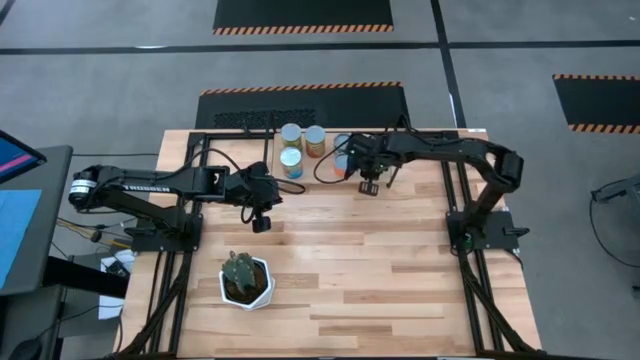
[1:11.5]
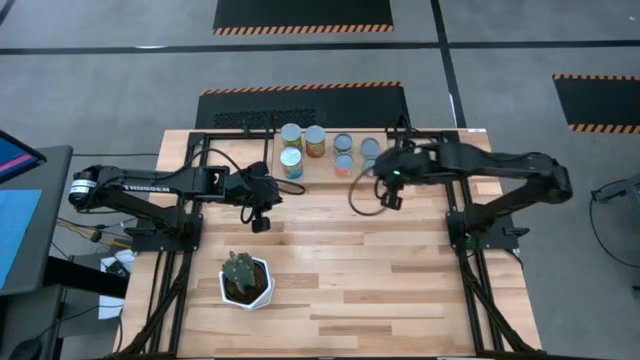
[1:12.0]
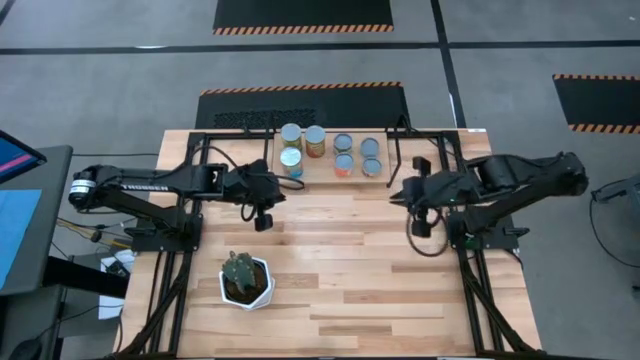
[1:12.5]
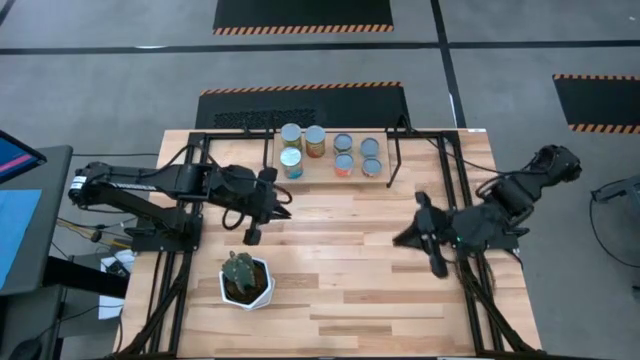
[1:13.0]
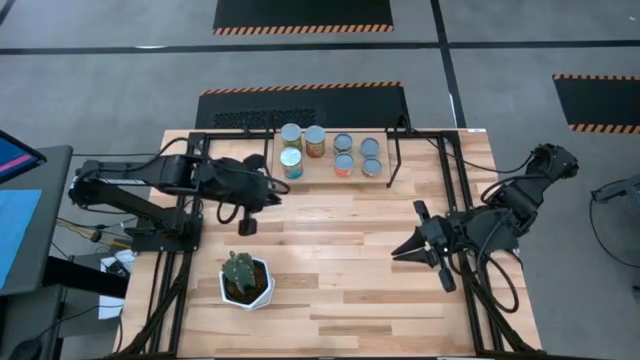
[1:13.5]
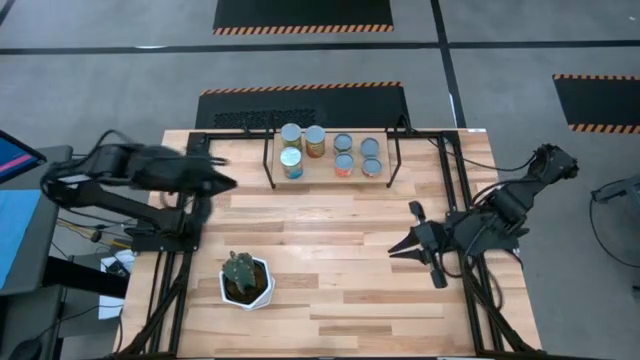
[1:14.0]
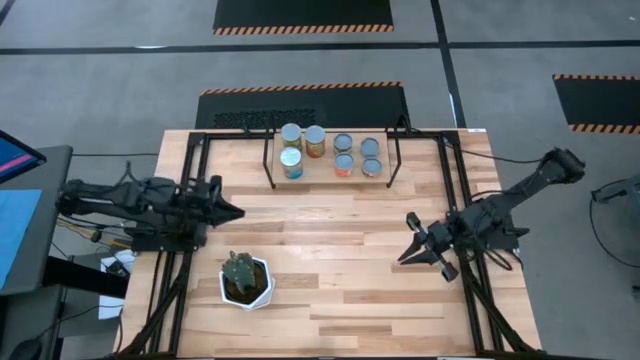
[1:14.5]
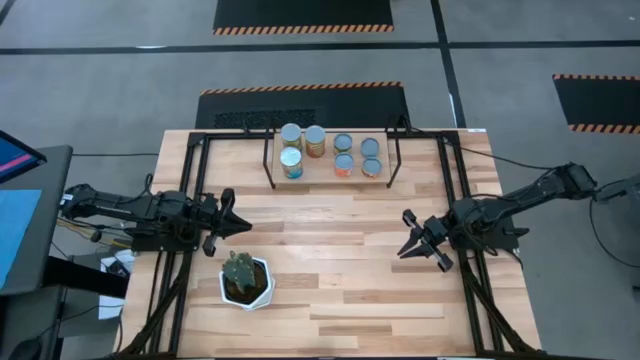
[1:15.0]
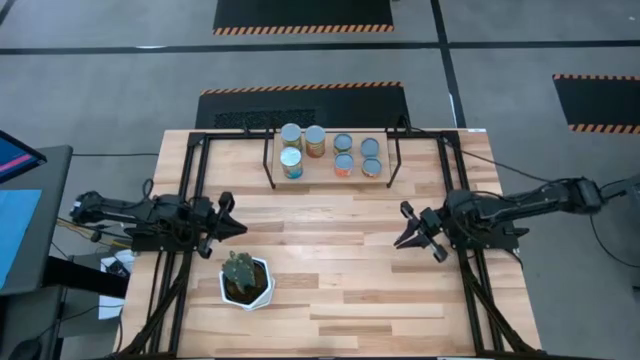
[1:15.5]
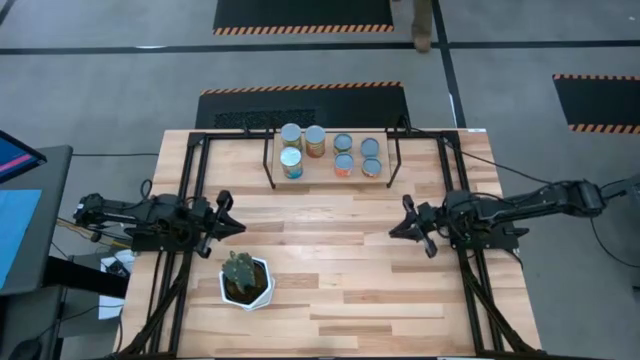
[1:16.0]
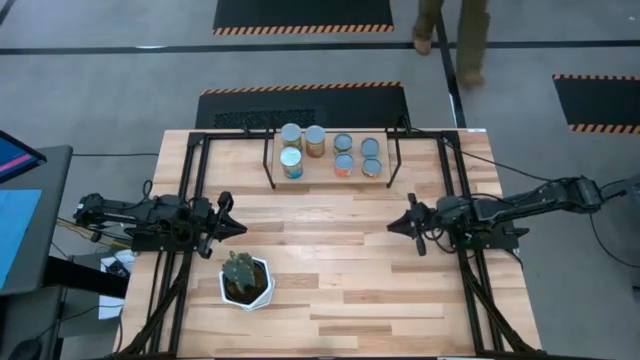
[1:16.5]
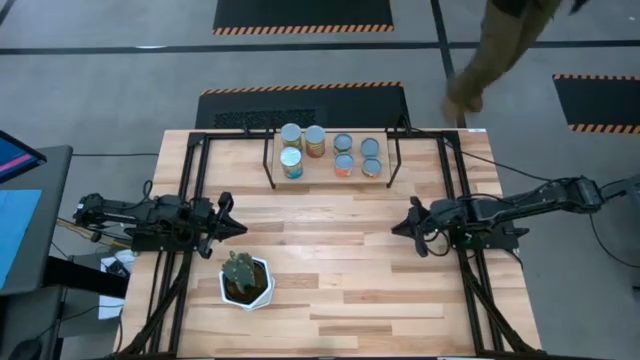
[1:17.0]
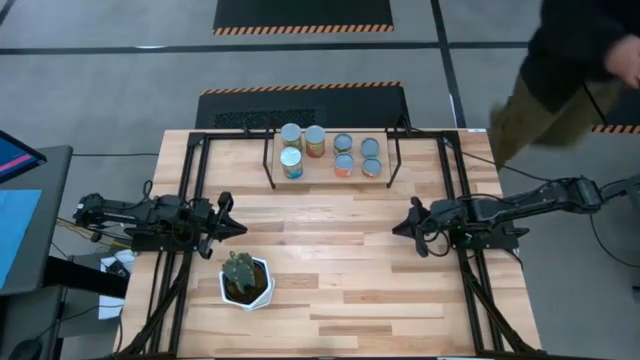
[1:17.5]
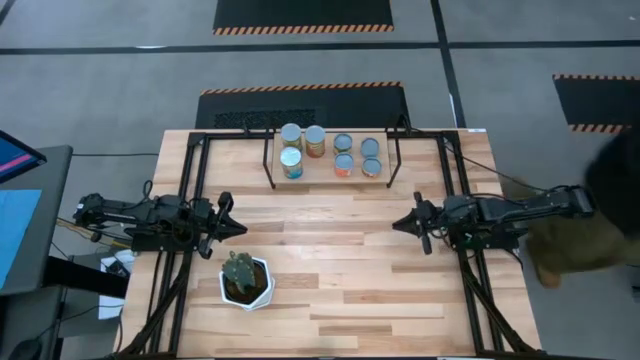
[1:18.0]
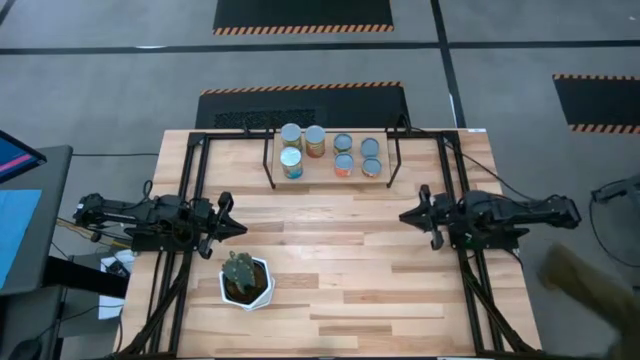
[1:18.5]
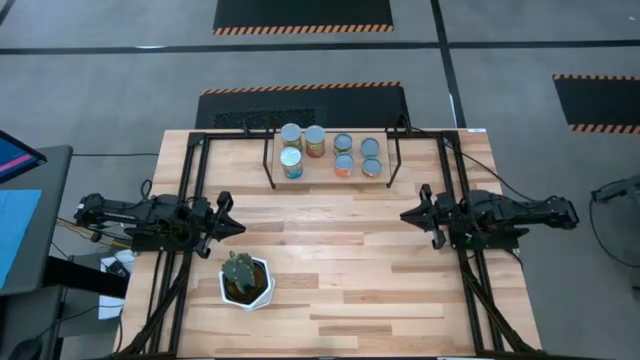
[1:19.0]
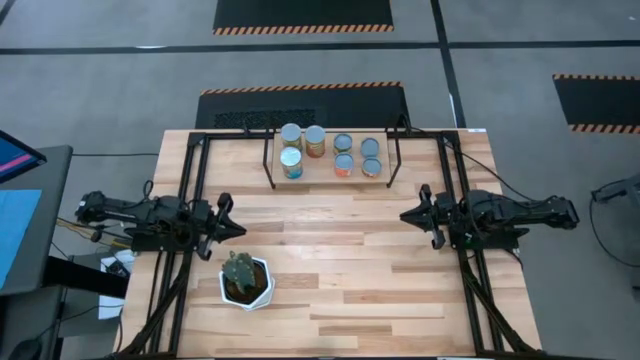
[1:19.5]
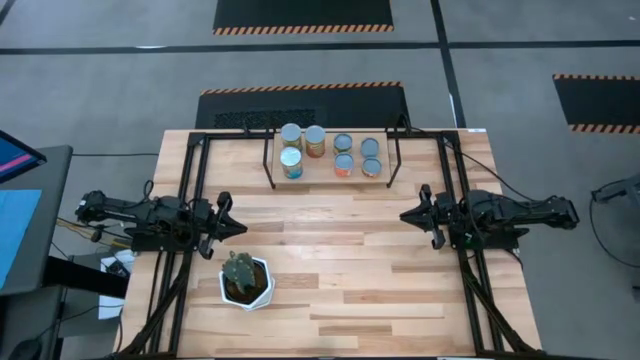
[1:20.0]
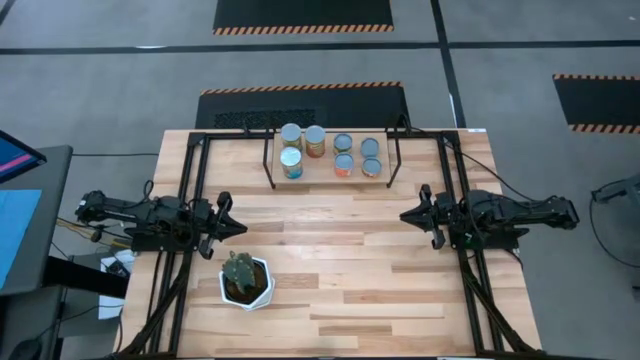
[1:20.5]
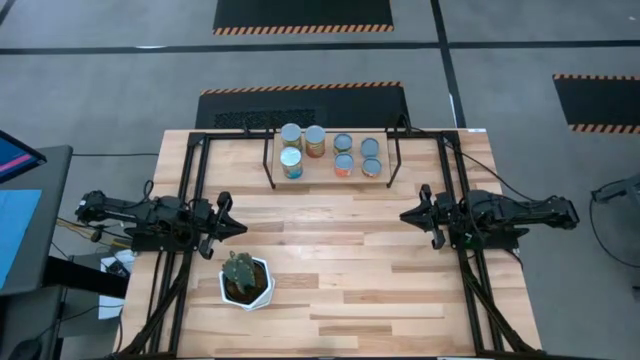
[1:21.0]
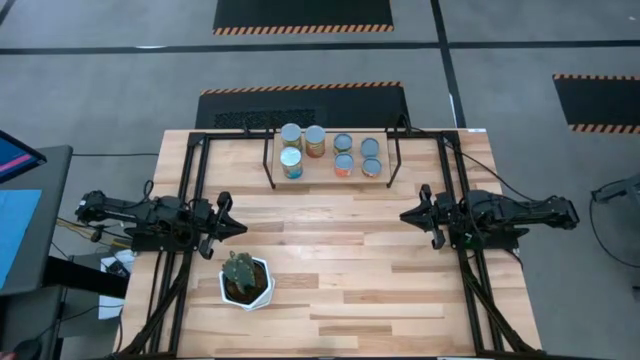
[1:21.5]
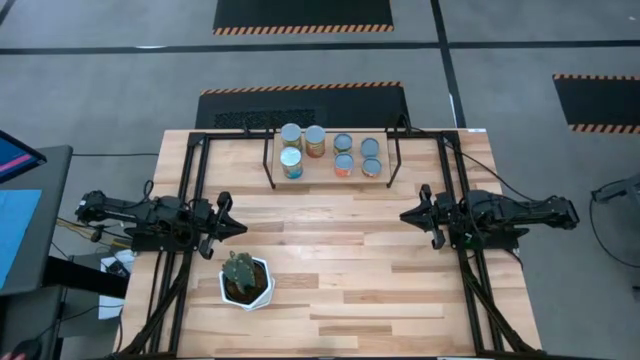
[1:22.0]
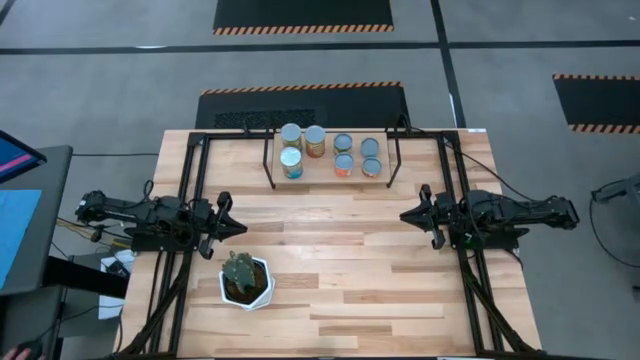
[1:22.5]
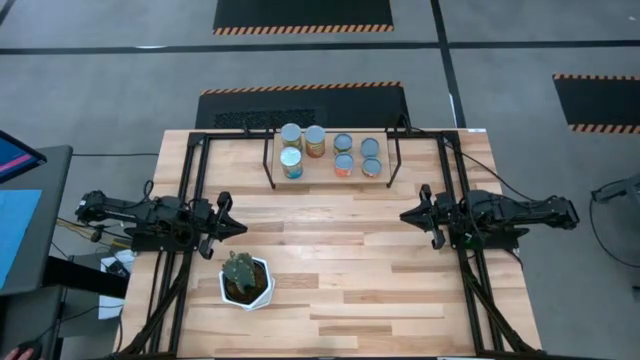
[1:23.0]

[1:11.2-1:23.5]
Task: Pick and place cans onto a shelf
Return to Home Position

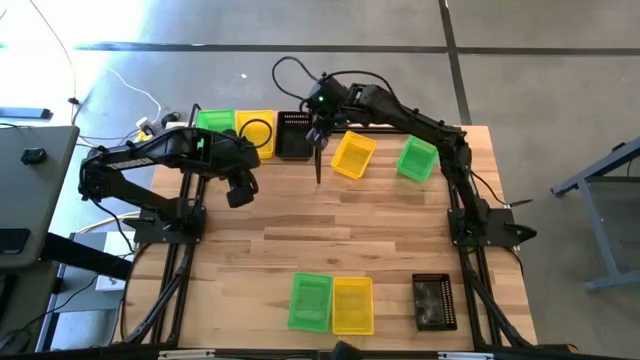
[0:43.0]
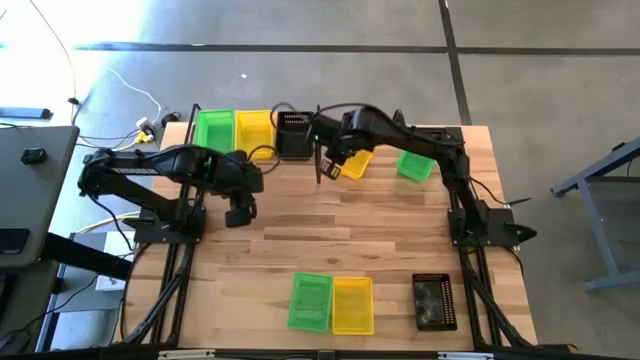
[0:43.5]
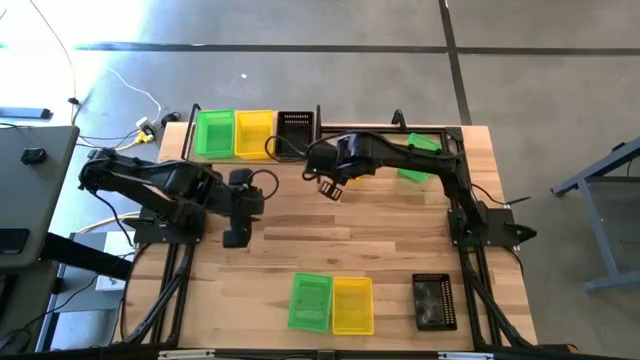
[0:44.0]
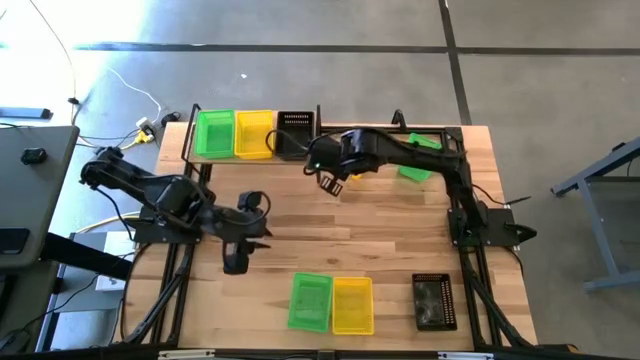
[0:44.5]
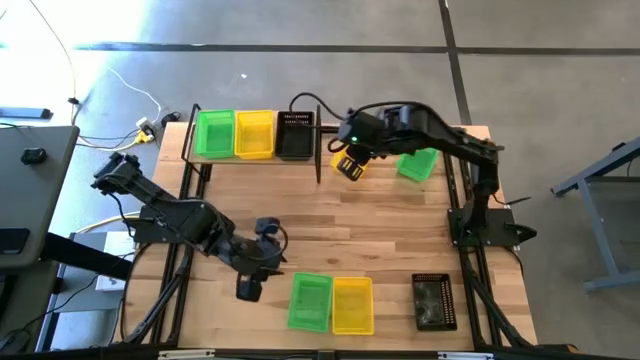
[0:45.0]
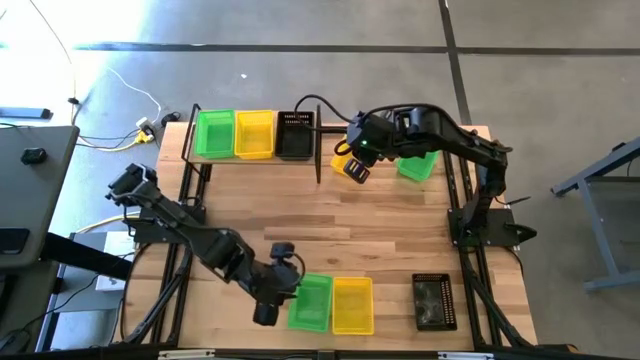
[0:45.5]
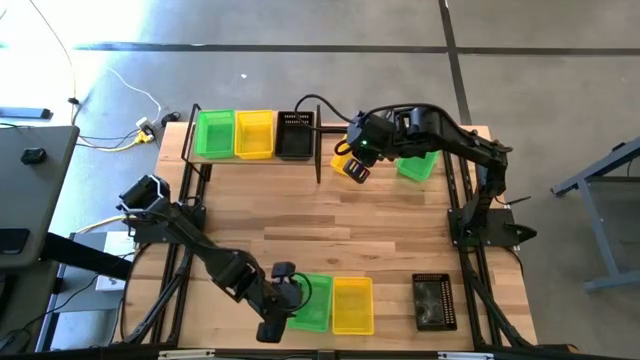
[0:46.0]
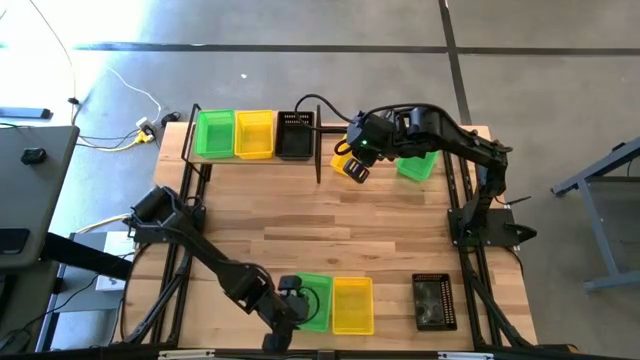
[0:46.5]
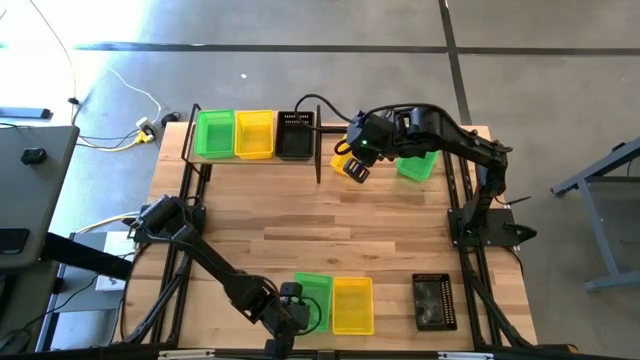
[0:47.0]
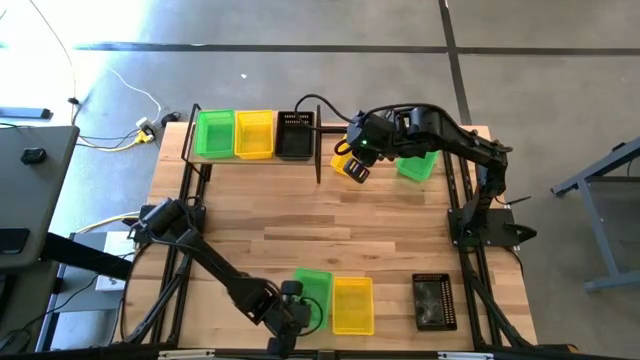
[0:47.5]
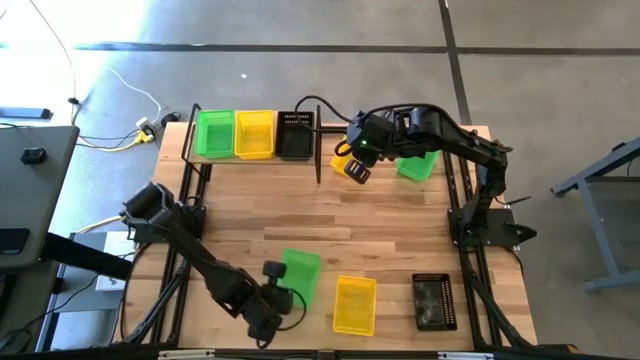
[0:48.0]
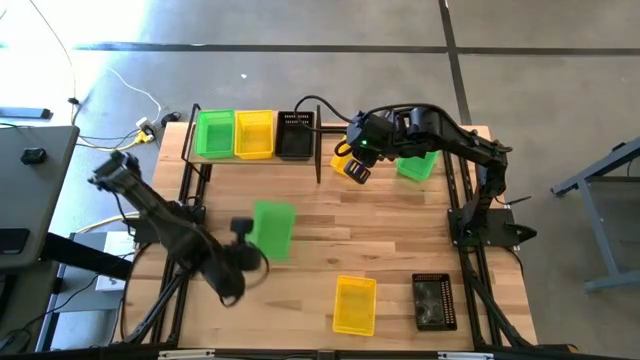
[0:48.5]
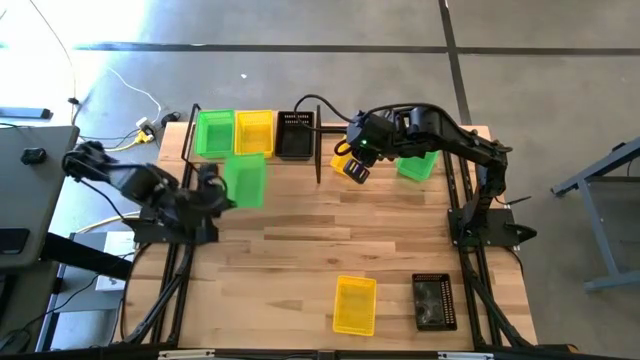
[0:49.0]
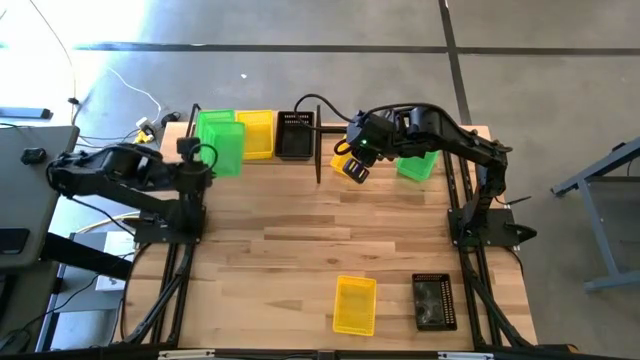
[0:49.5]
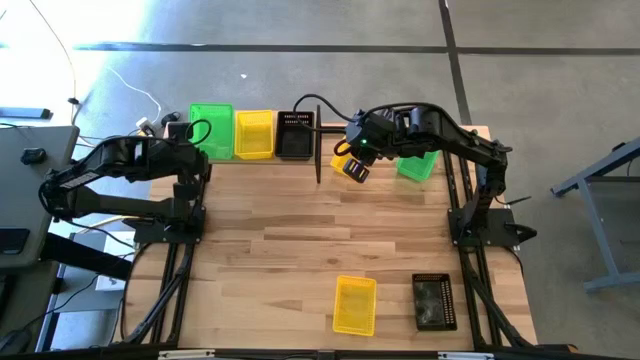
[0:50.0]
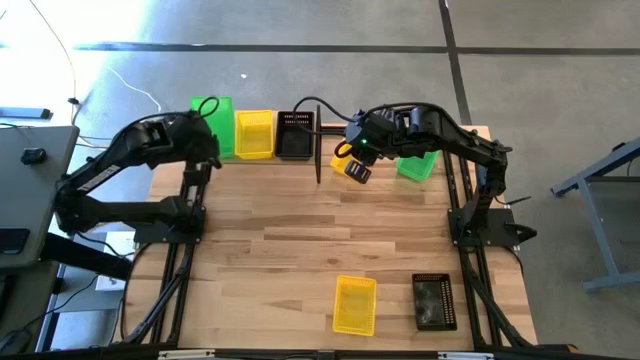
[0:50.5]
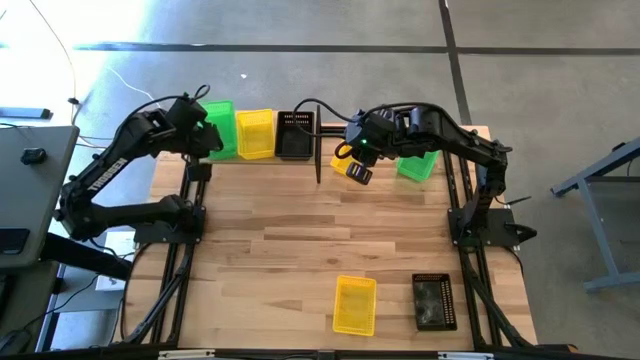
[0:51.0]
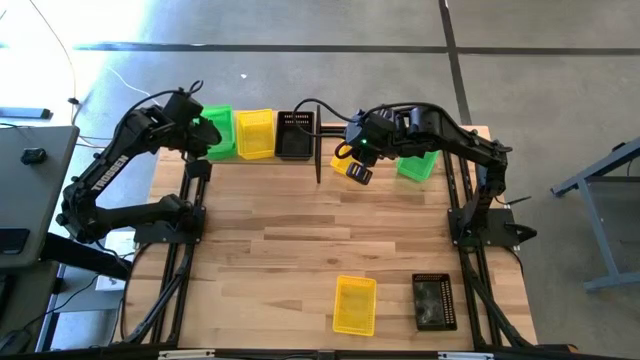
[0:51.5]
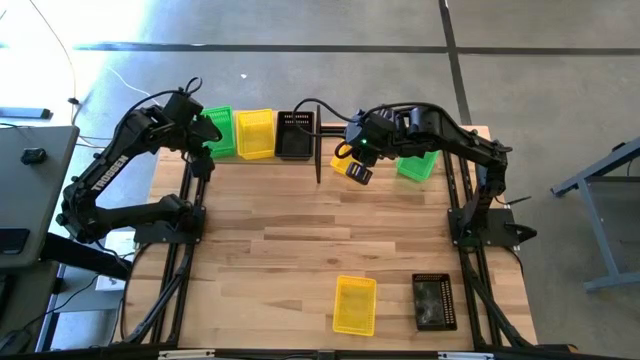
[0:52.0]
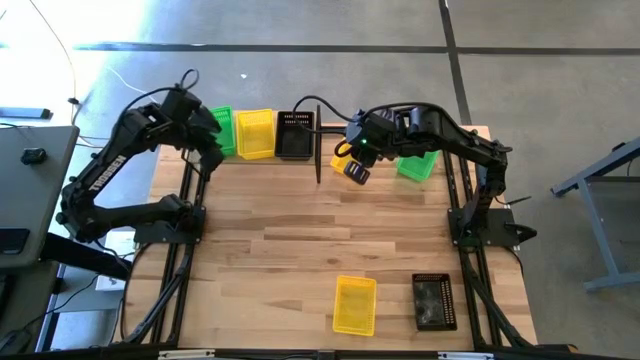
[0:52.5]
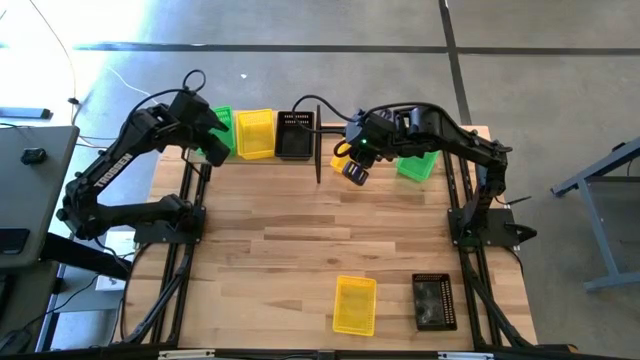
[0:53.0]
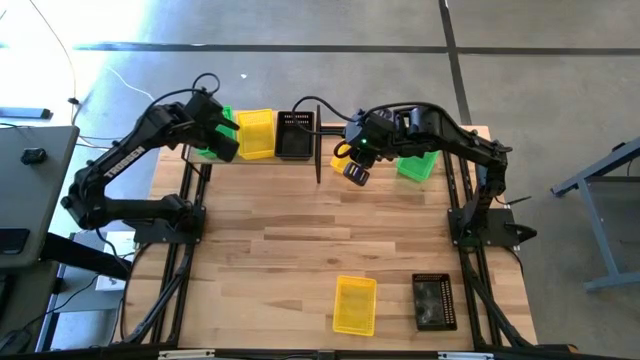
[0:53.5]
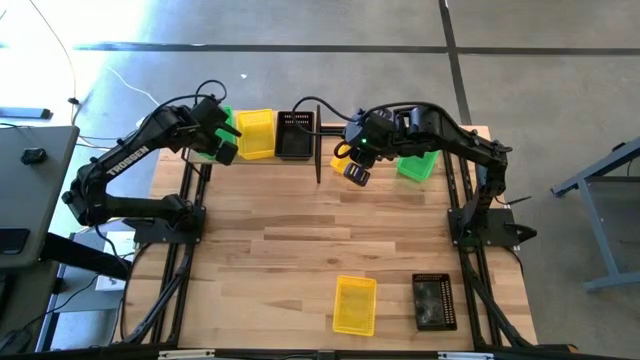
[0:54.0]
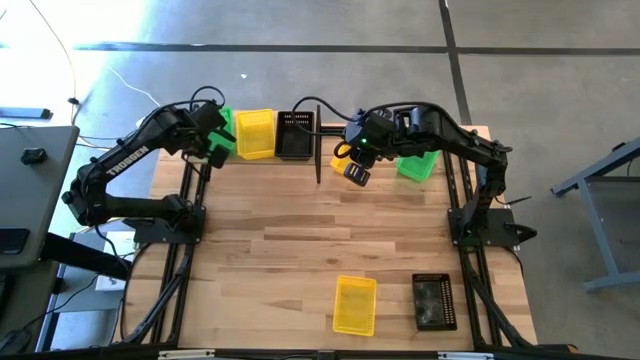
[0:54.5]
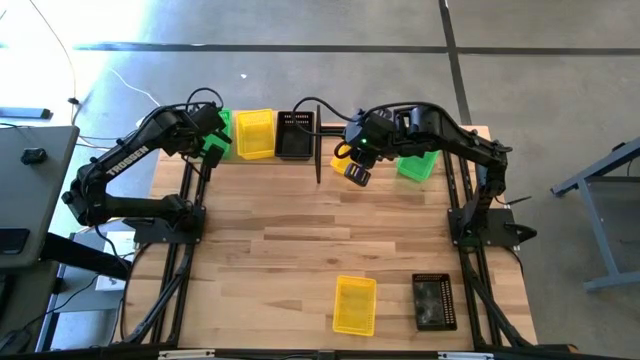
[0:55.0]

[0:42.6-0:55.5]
Task: Stack baskets on shelf by color
Stack the bottom green bin on top of the green bin on the shelf
